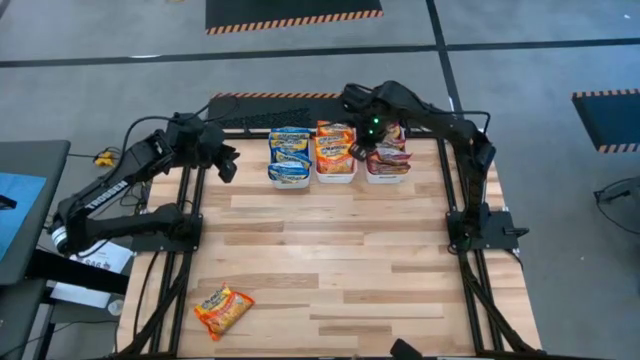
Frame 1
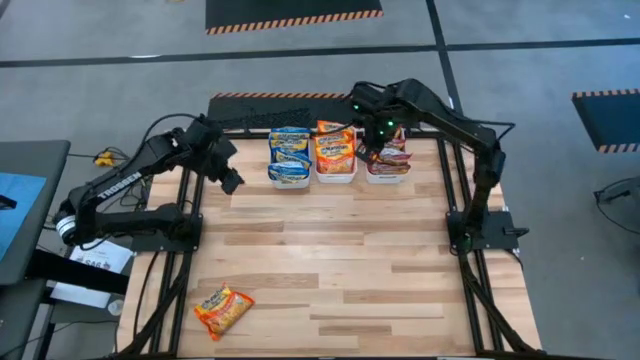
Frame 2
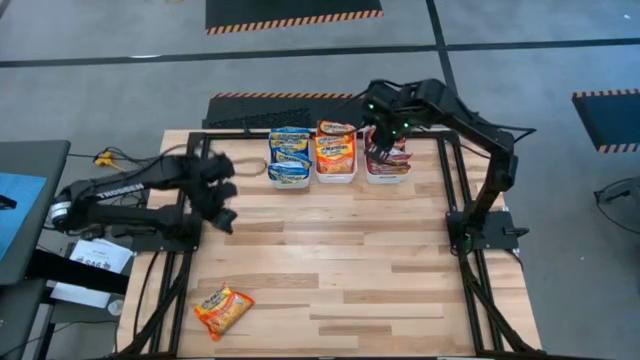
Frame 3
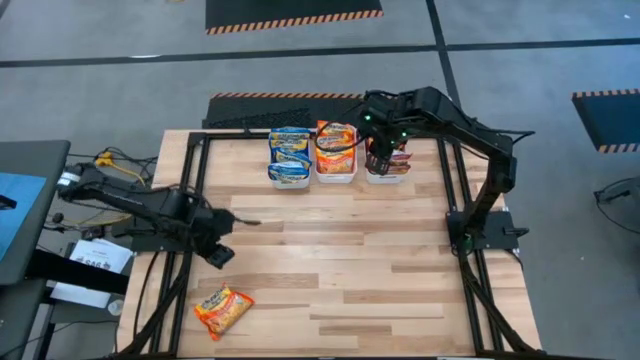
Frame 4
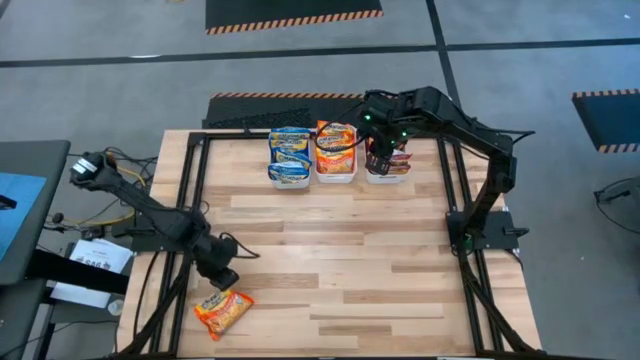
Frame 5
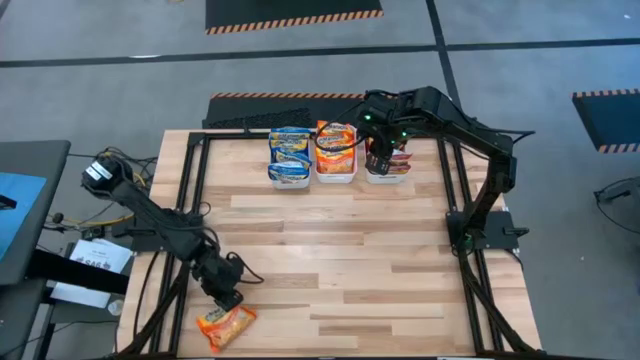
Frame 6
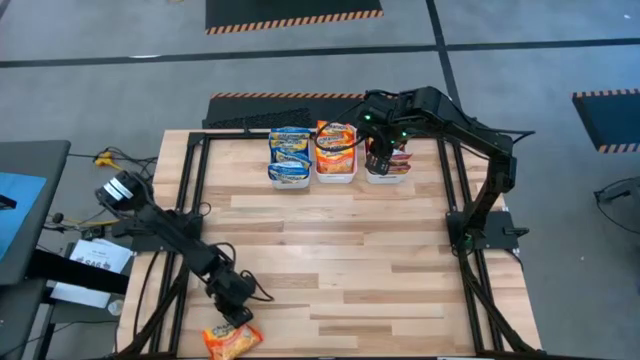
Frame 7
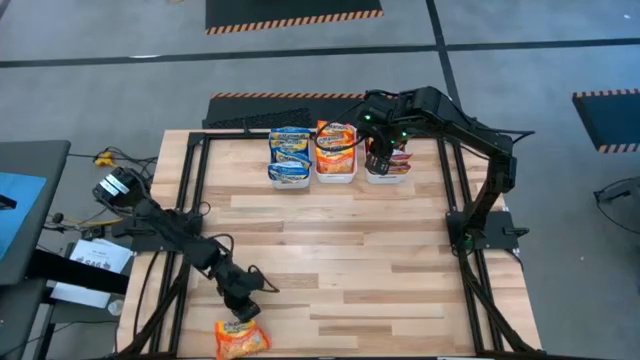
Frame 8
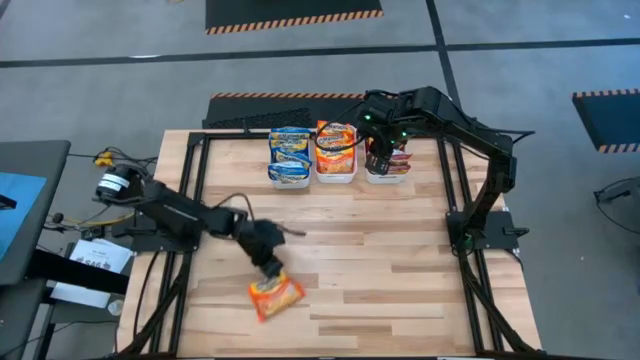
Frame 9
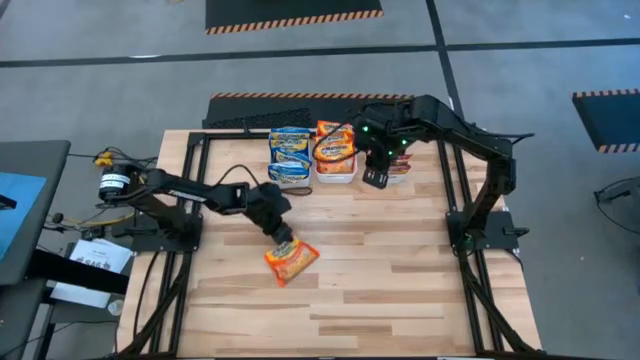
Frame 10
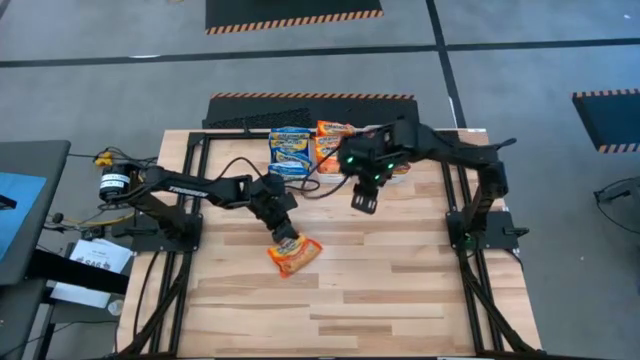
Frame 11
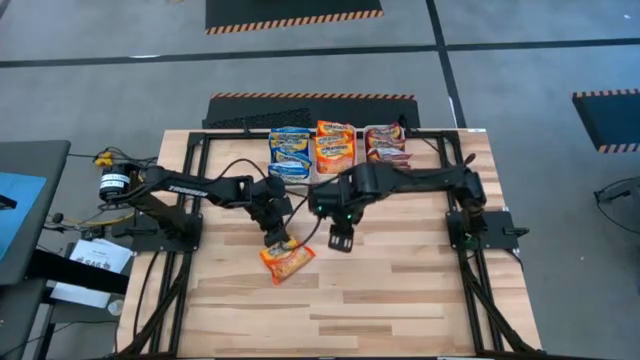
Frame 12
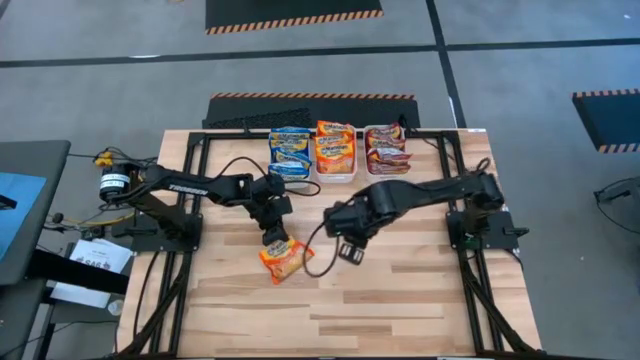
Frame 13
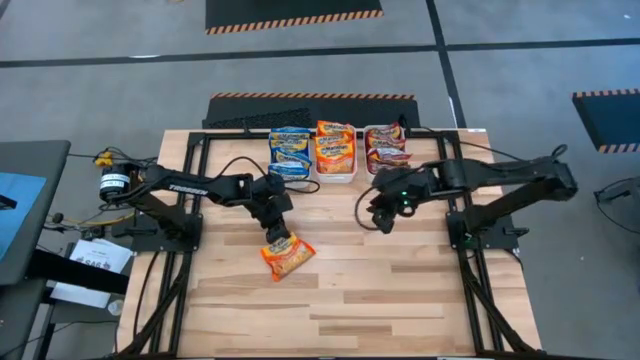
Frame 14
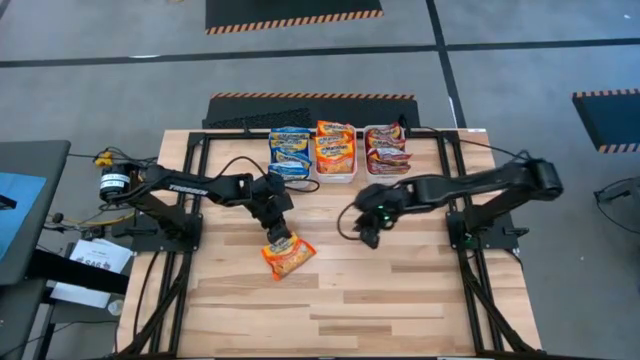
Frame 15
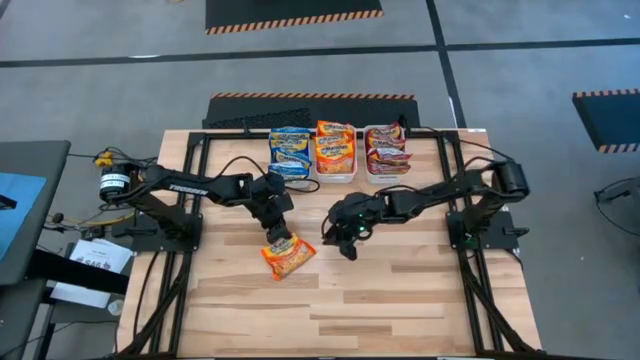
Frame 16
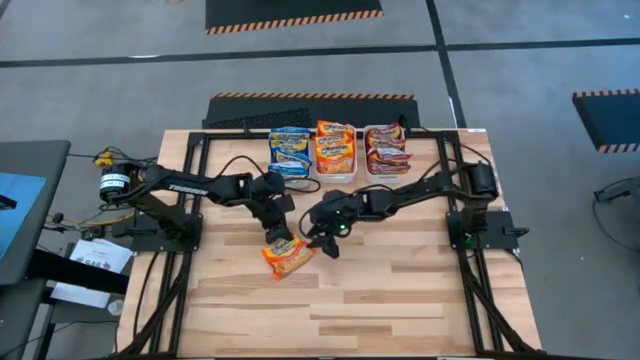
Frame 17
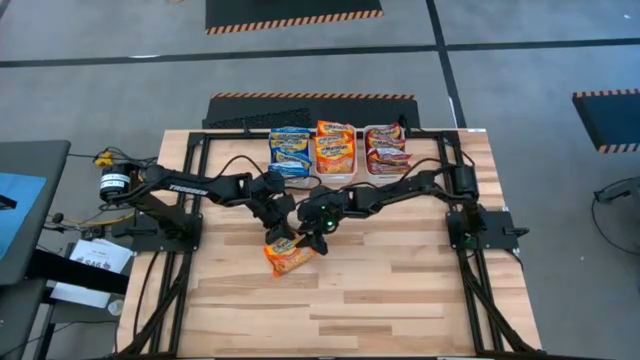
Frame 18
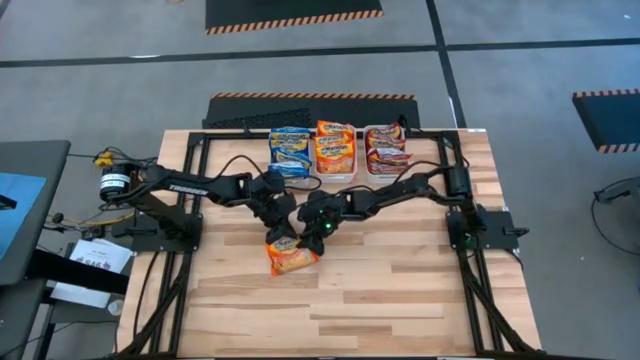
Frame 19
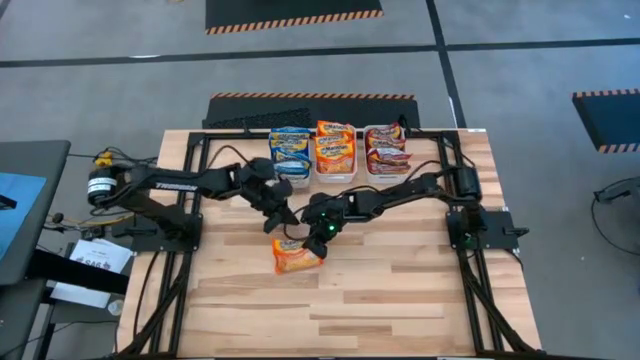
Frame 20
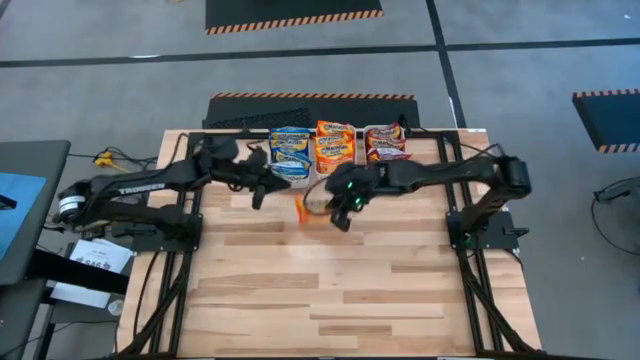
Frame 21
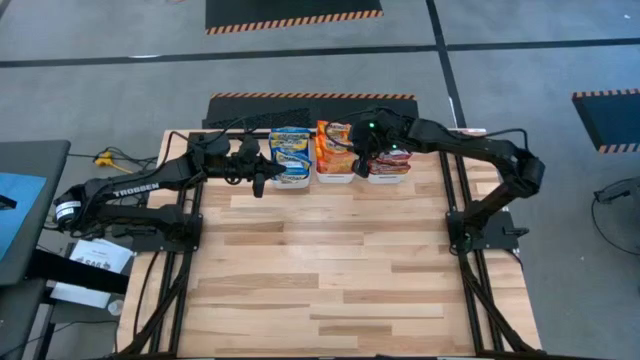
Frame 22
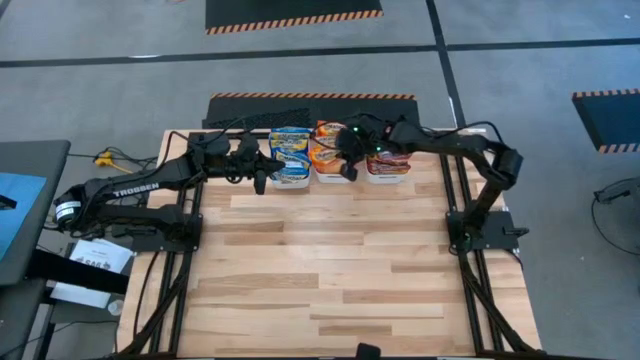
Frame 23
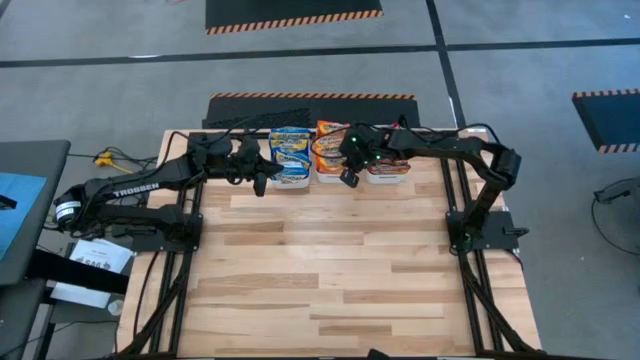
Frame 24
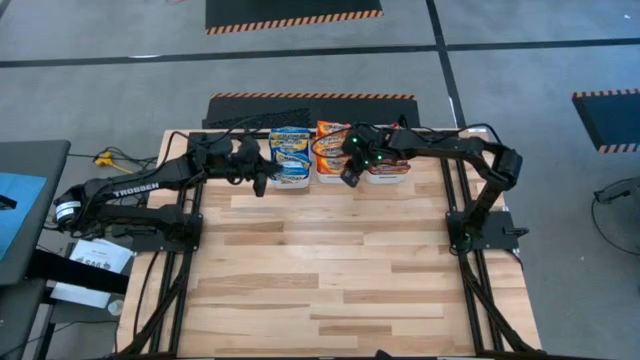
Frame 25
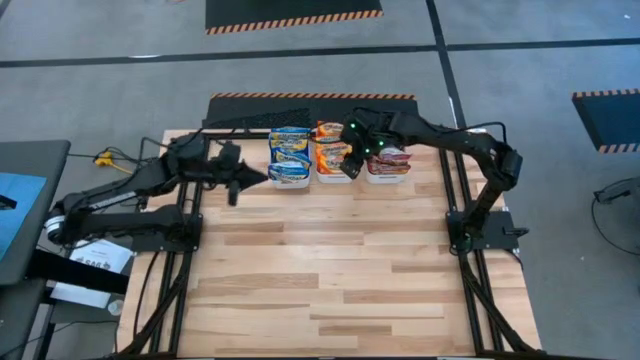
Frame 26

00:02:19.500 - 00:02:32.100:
Task: Sort Maruchan noodles
Put the orange noodle pack into the center white bin

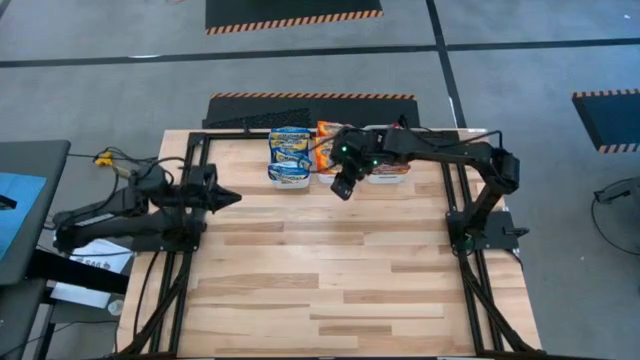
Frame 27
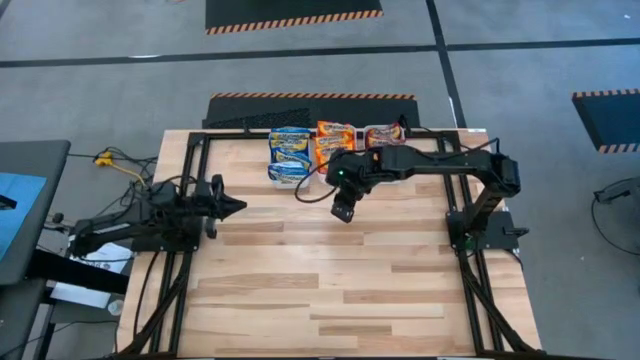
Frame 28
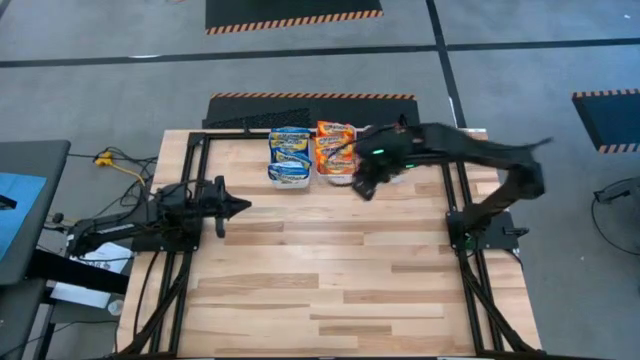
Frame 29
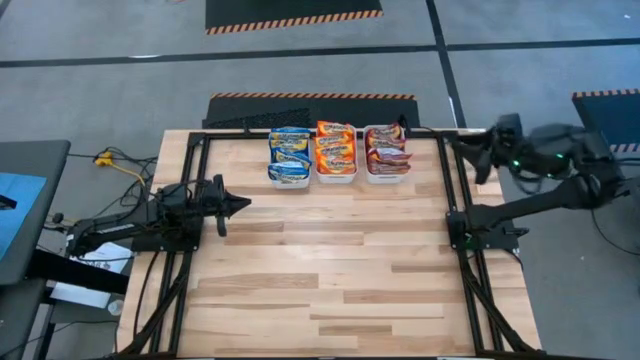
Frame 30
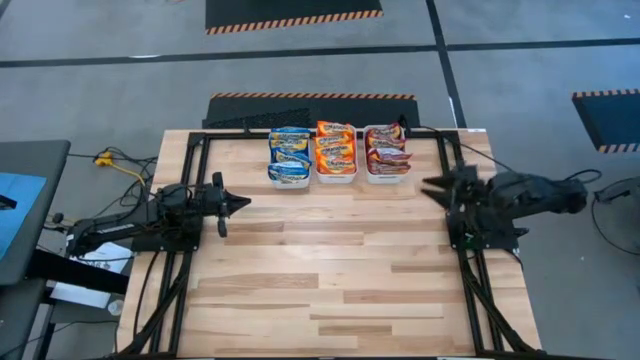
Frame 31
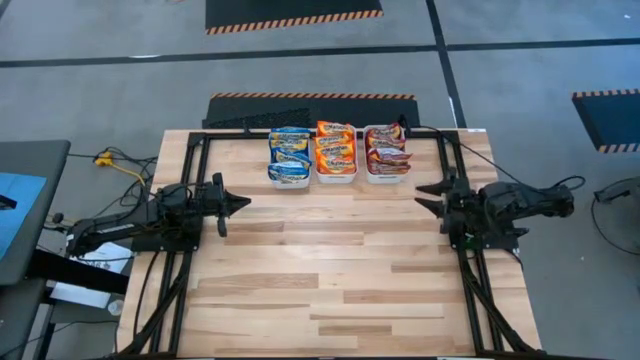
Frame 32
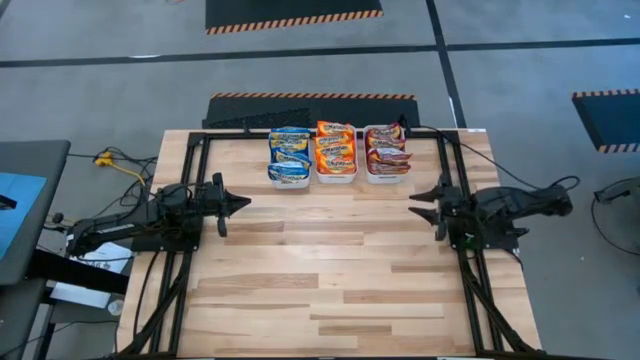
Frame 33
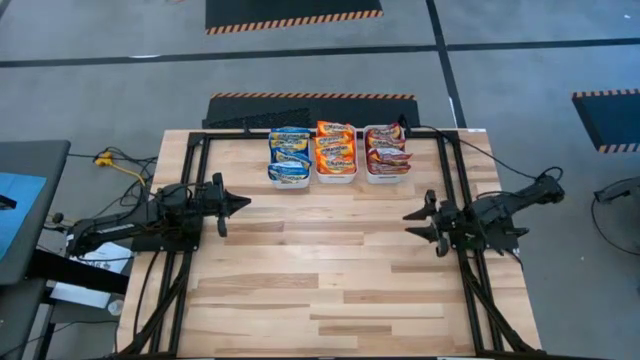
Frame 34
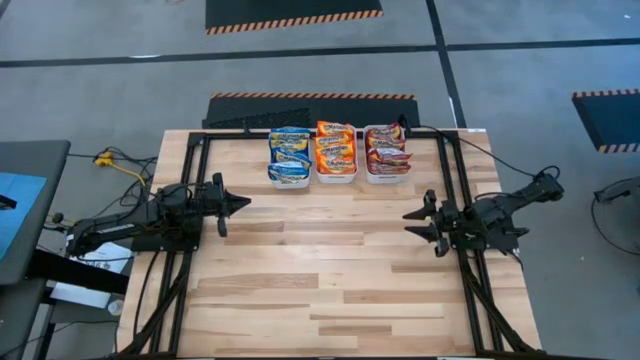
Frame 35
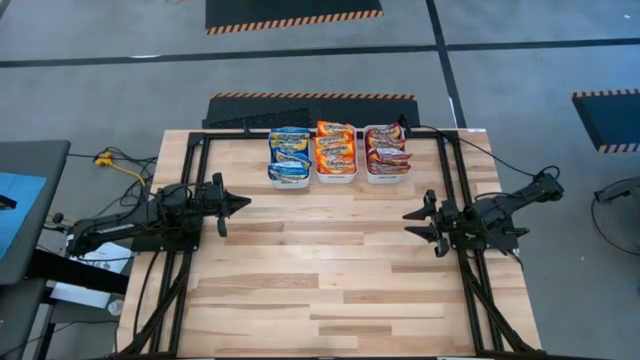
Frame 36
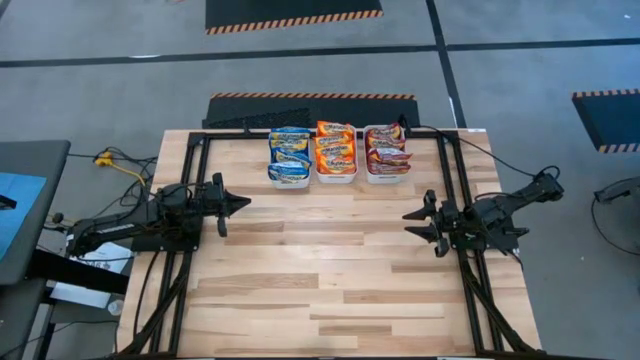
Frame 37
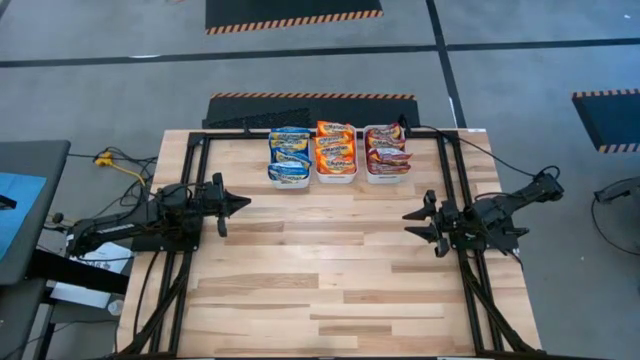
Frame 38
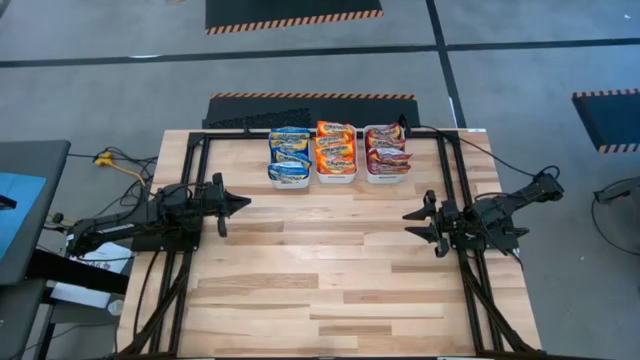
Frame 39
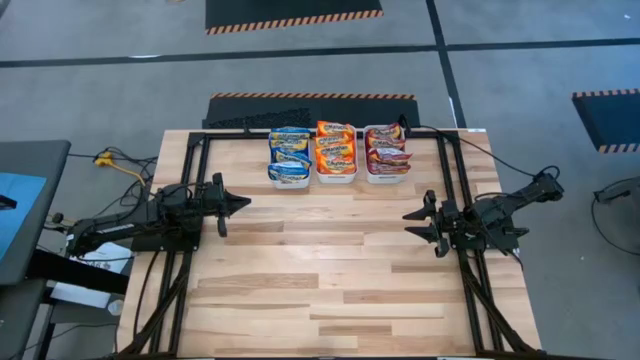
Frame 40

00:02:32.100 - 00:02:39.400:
Return to Home Position

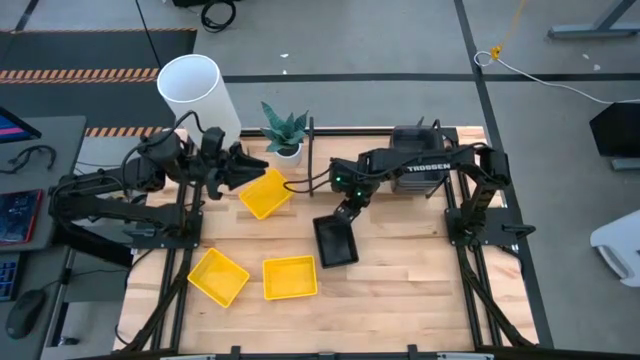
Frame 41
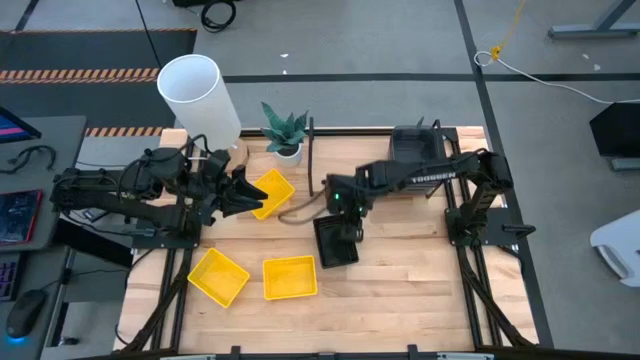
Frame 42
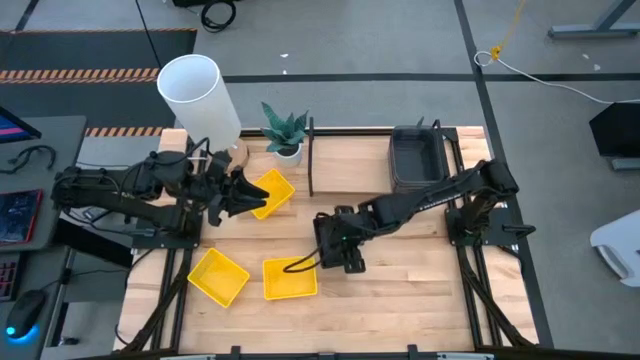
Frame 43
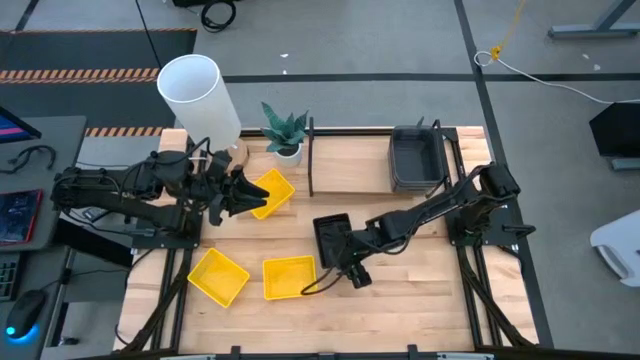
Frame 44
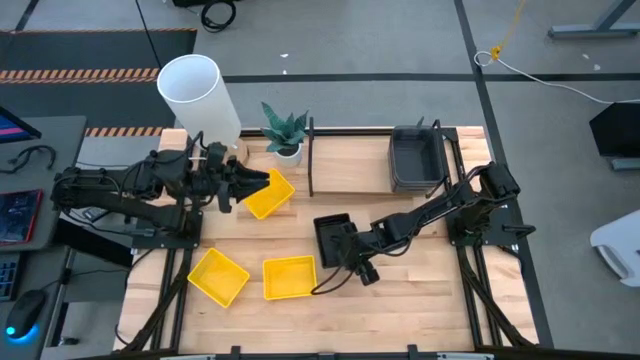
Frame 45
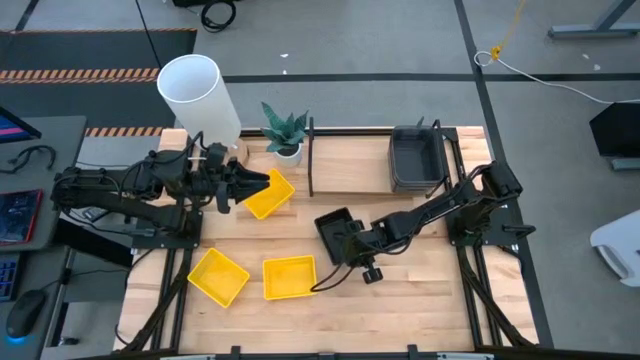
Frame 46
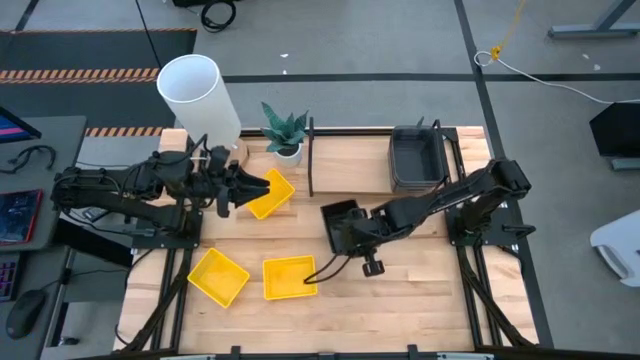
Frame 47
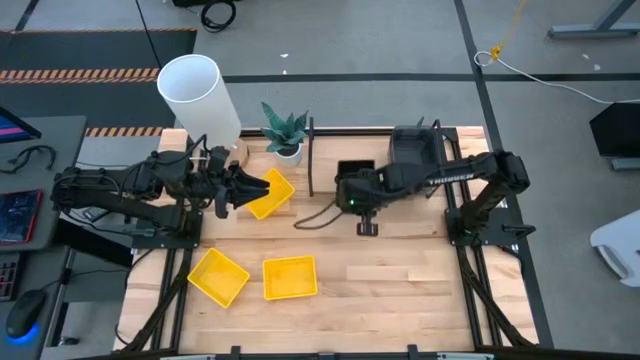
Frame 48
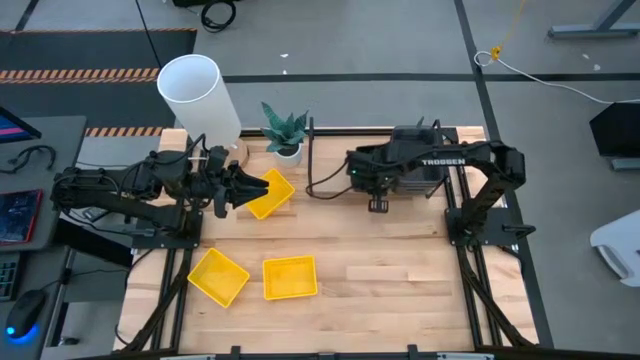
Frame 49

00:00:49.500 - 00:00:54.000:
Task: Stack baskets on shelf by color
Put the stacked black basket on the shelf
